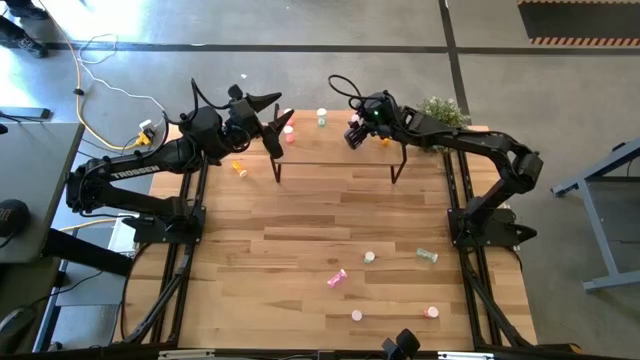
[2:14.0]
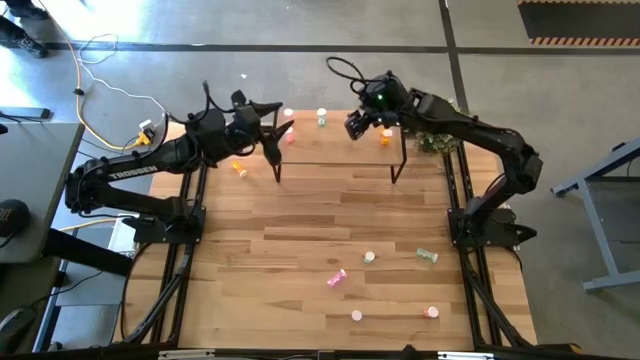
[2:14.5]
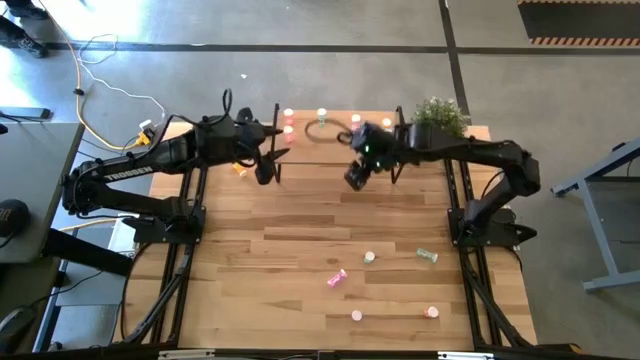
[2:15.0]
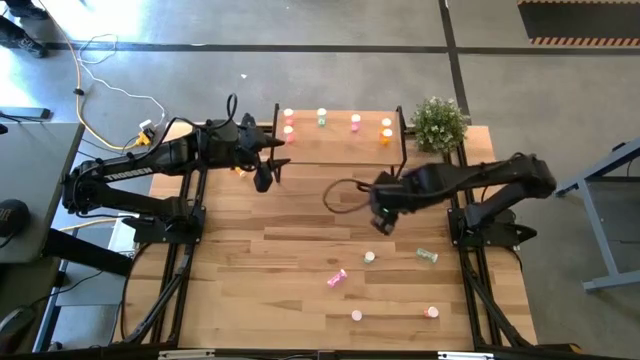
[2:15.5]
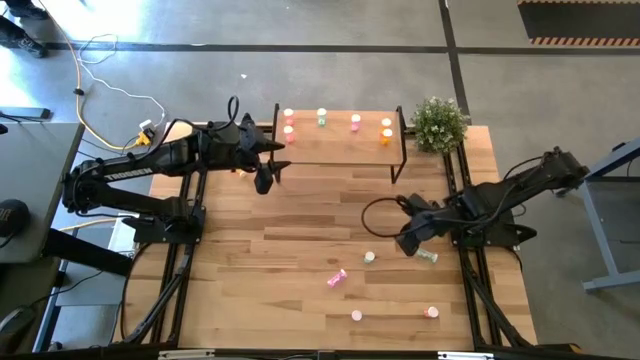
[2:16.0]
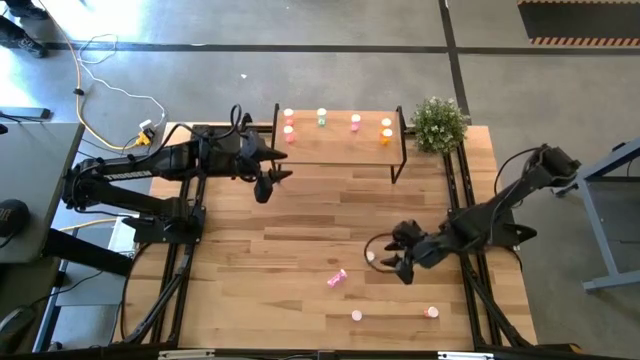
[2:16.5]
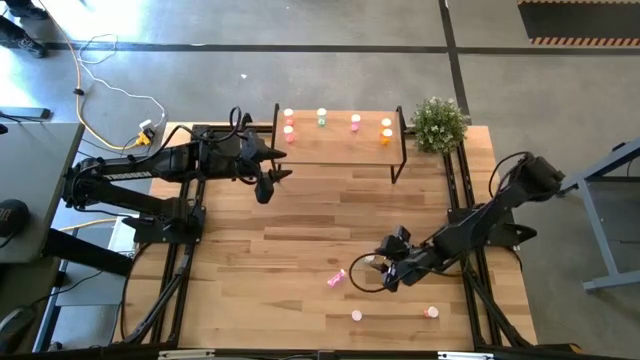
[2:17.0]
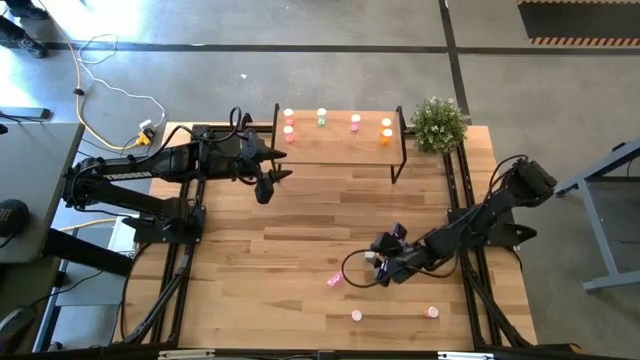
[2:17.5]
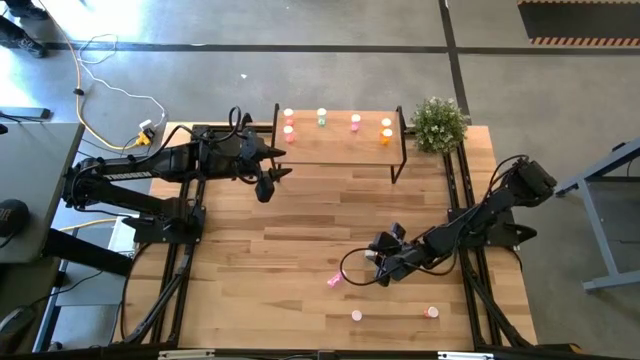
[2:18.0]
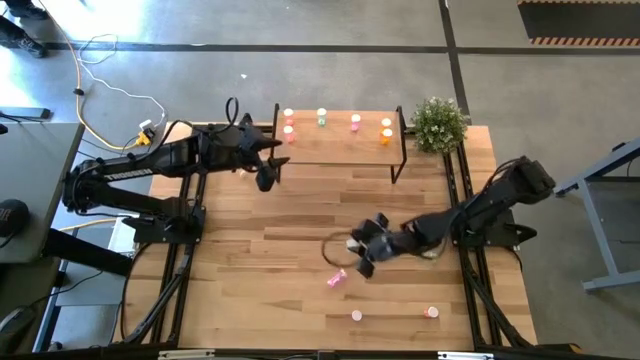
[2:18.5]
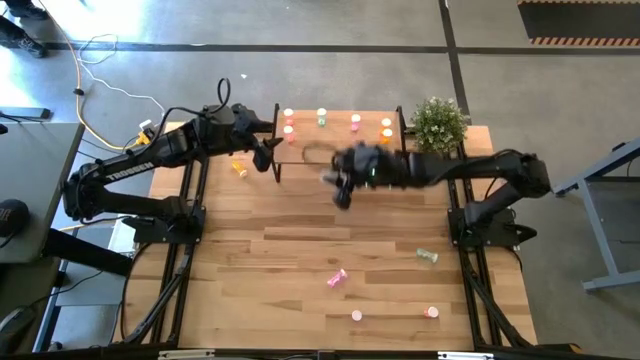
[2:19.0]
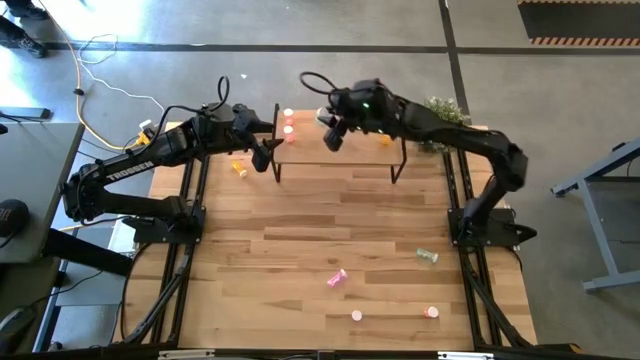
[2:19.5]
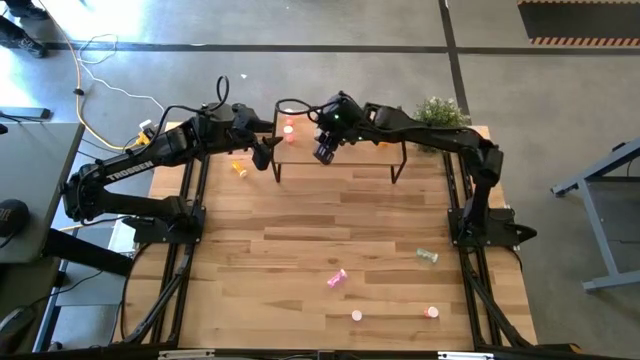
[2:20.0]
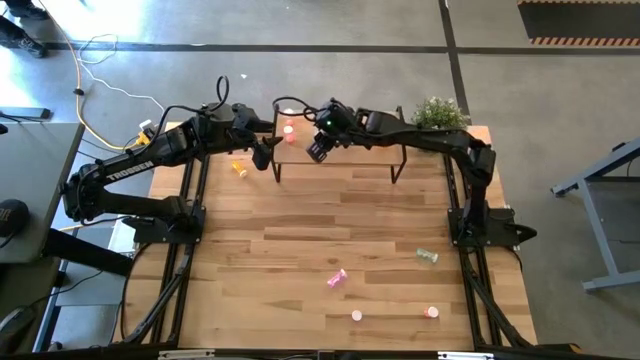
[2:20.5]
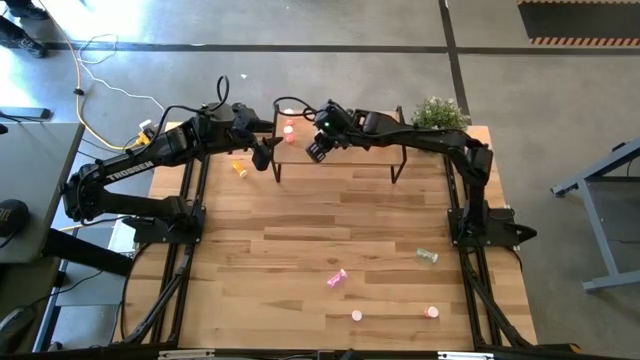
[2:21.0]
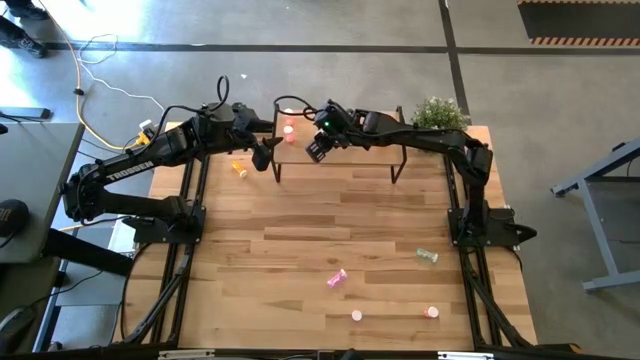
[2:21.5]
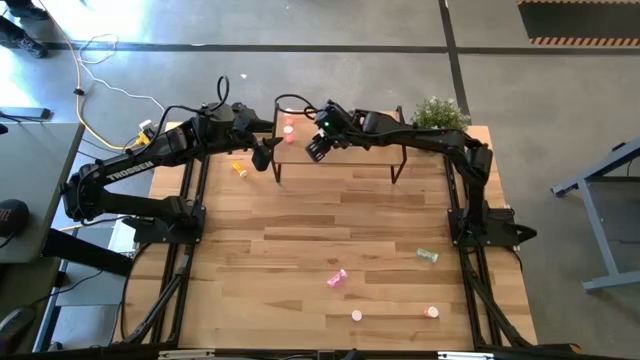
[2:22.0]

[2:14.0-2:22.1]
Task: Pick and place medicine bottles onto shelf by color
Put the left blue pill bottle on the shelf aligned with the other blue pill bottle

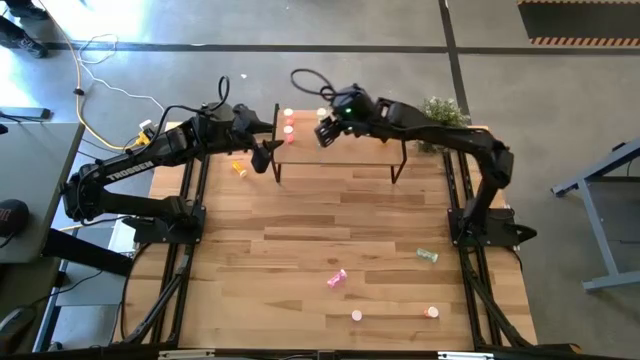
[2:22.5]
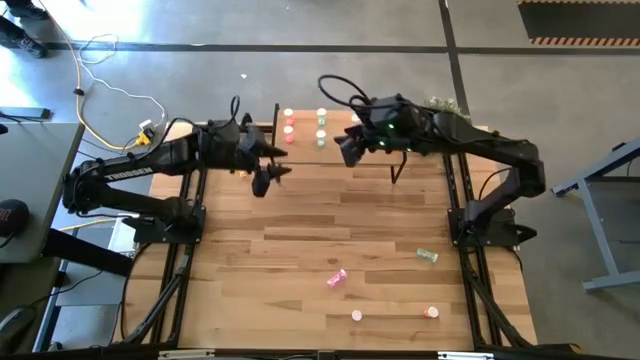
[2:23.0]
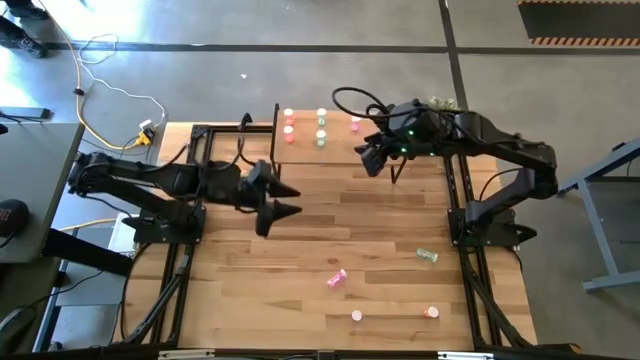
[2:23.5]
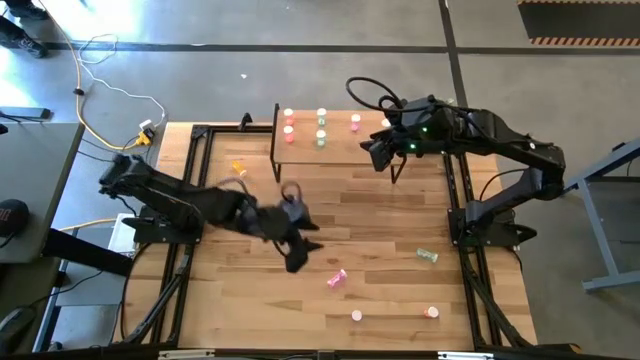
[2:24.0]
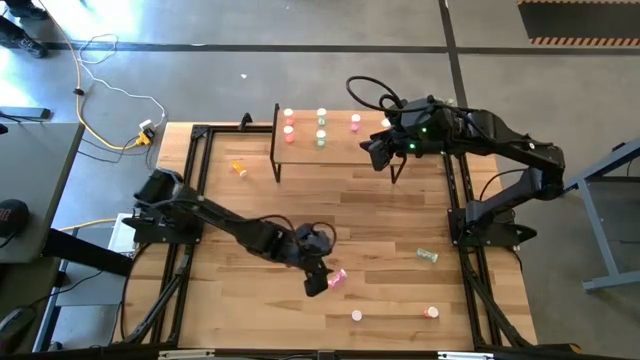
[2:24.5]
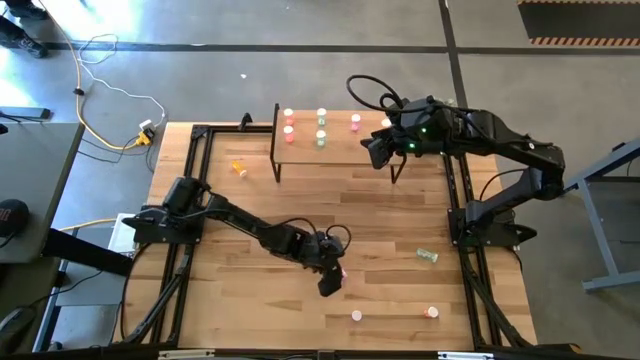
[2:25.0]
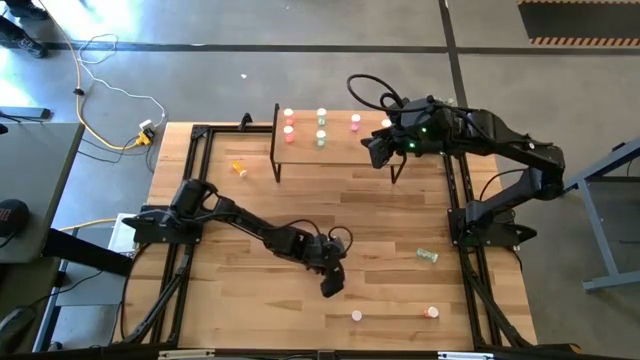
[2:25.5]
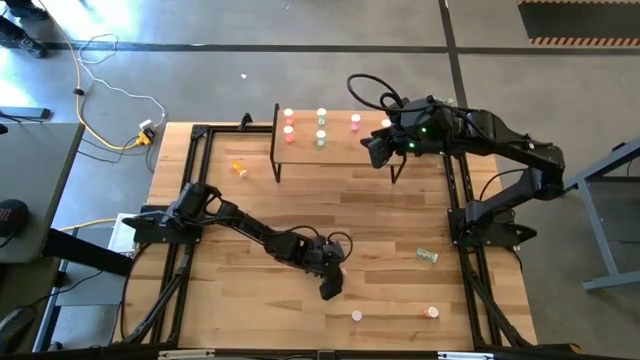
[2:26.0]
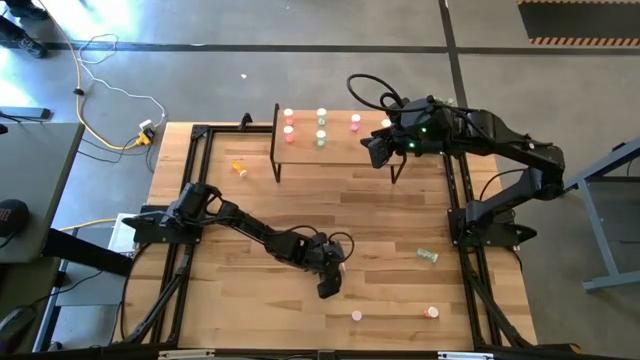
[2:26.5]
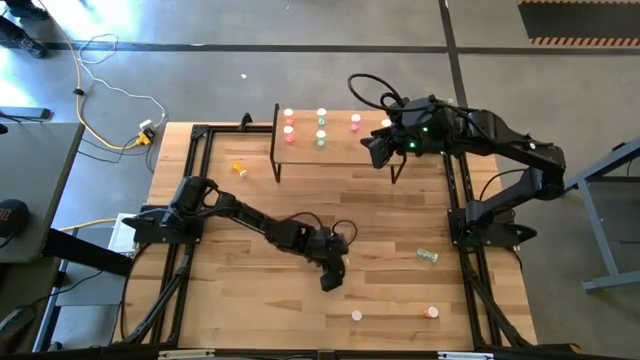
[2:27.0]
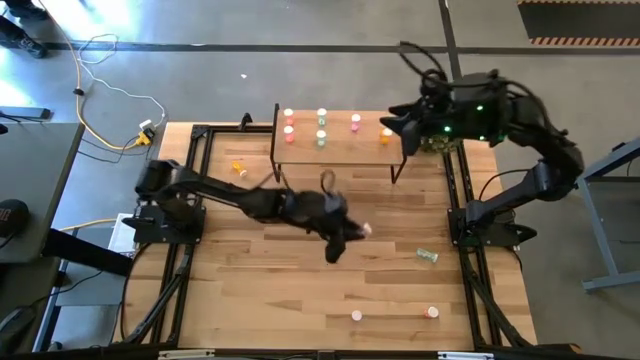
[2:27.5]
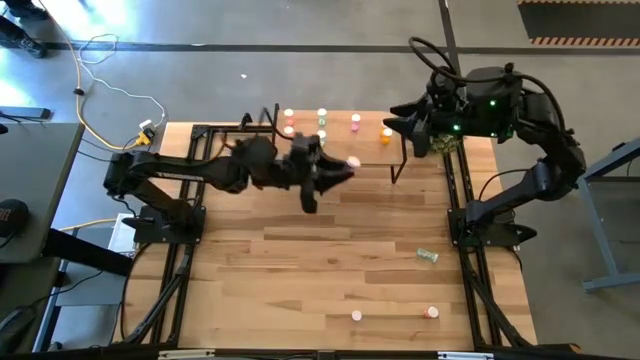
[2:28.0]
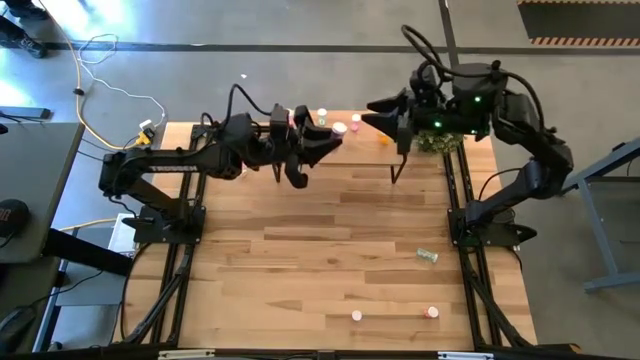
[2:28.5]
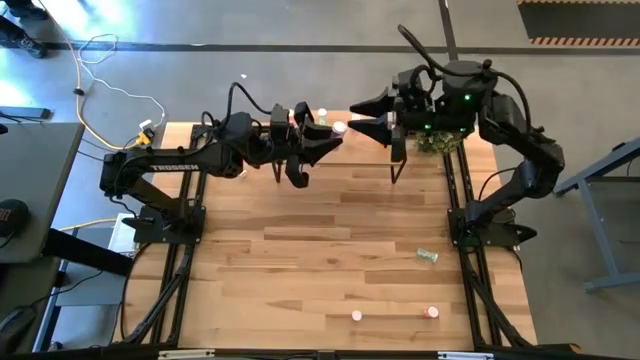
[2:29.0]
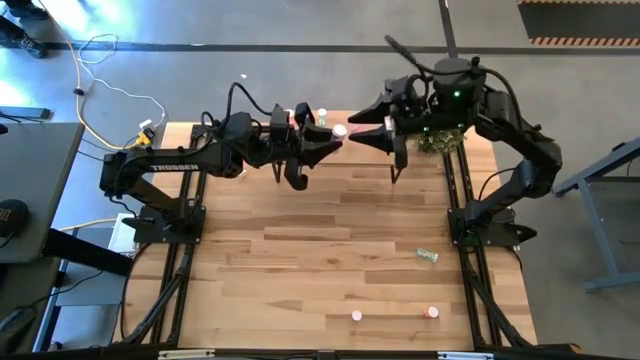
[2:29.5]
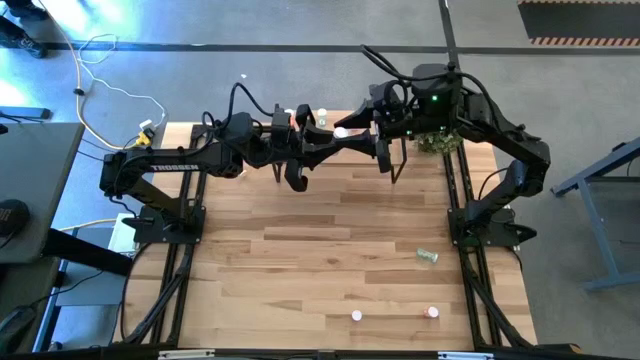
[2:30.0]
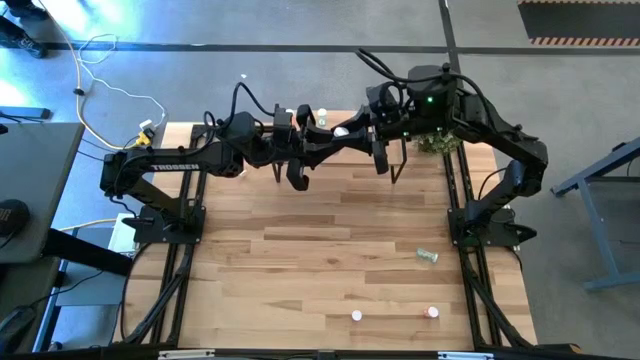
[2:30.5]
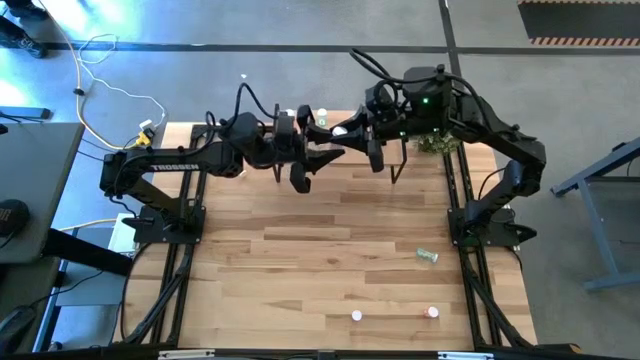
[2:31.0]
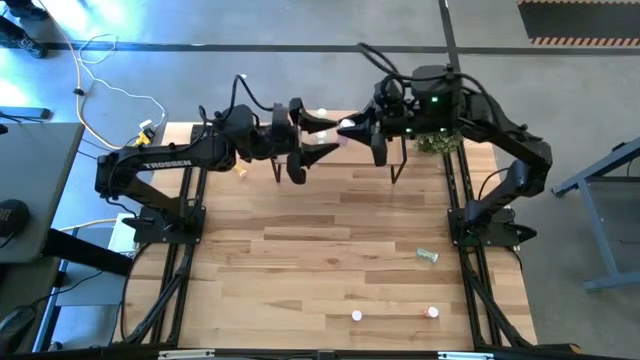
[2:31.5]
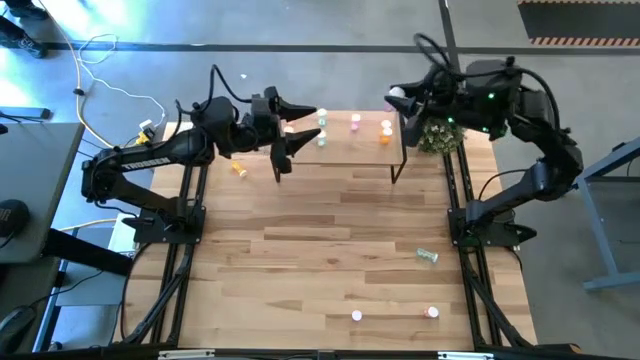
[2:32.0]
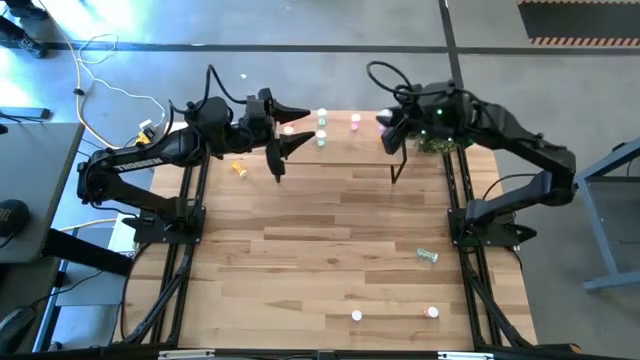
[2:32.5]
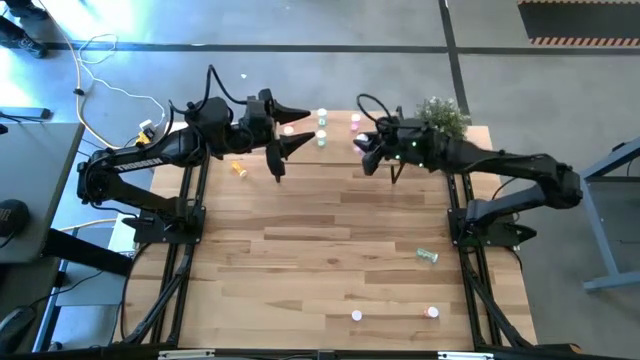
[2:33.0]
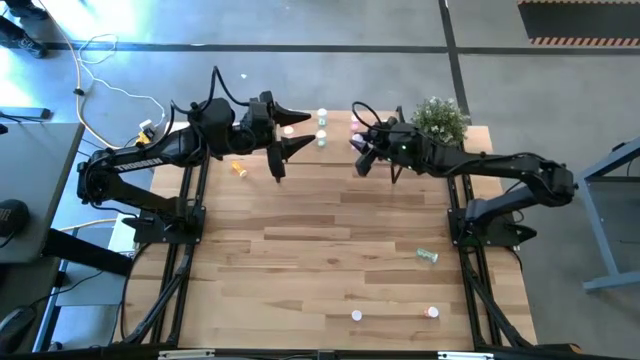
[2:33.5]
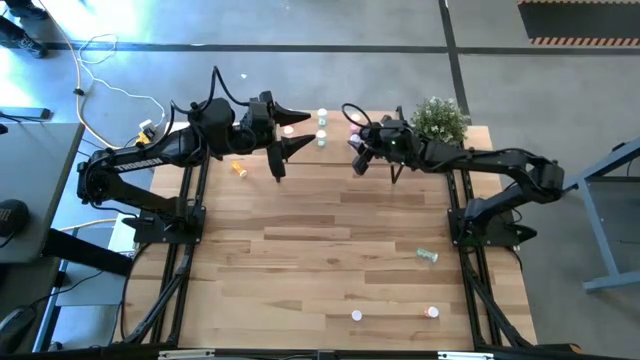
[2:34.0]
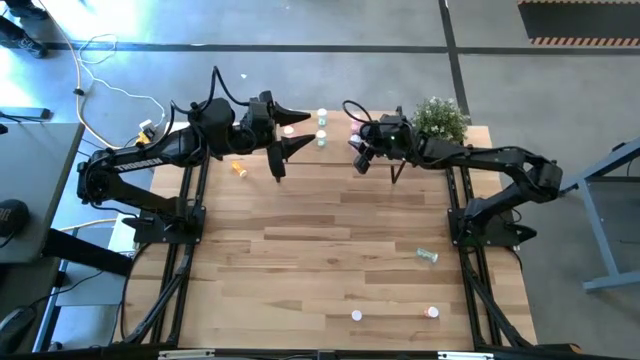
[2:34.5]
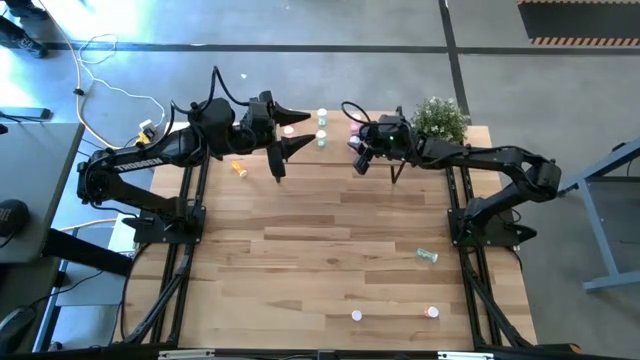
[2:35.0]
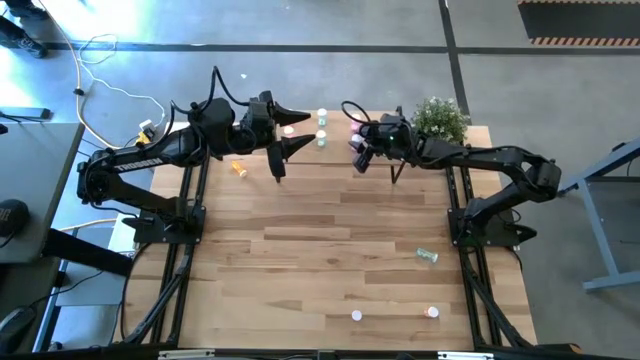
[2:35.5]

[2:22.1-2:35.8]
Put the top purple pill bottle on the shelf aligned with the other purple pill bottle
